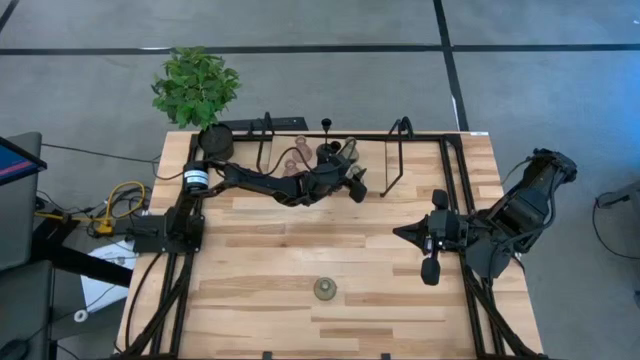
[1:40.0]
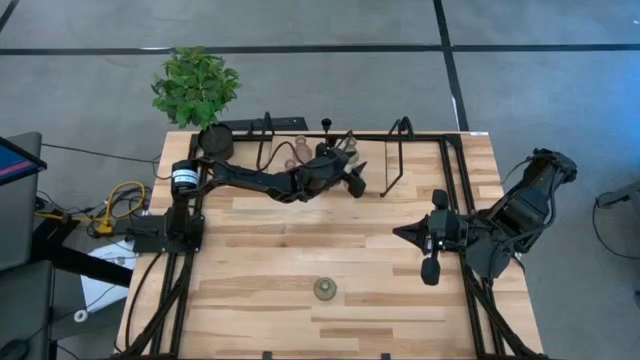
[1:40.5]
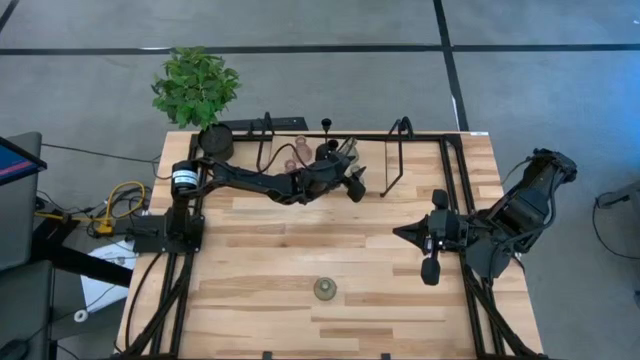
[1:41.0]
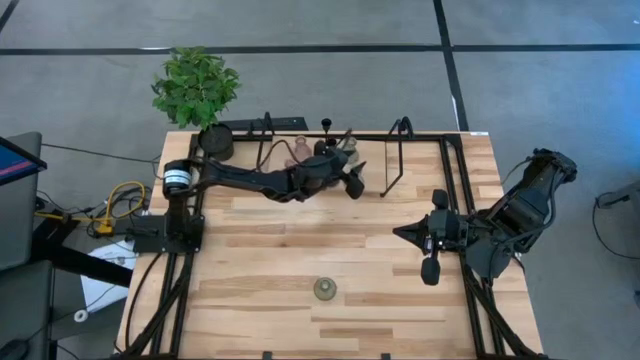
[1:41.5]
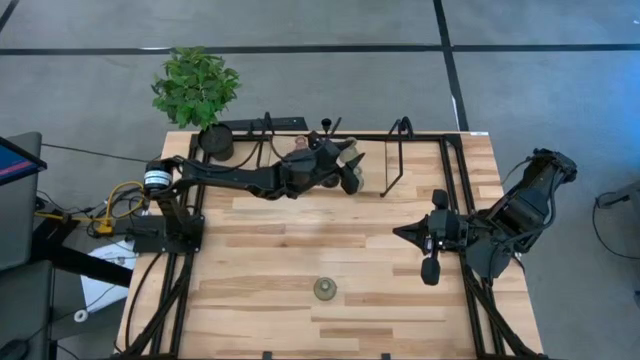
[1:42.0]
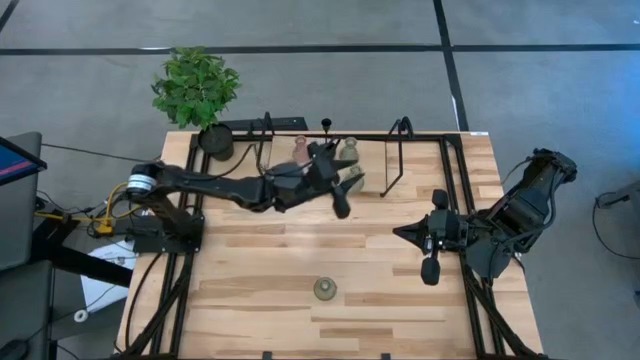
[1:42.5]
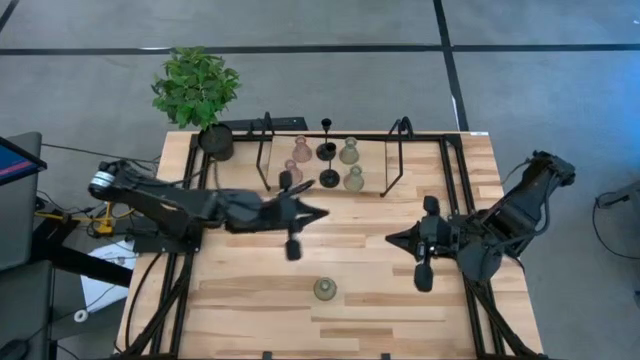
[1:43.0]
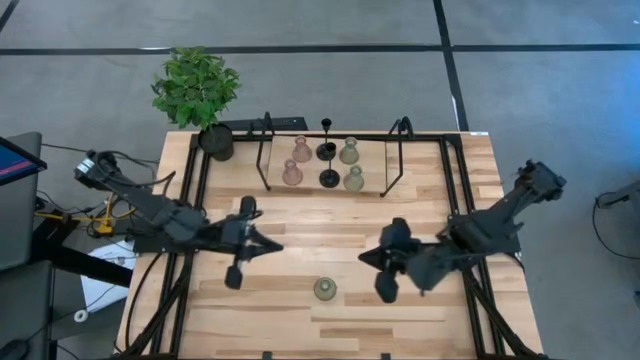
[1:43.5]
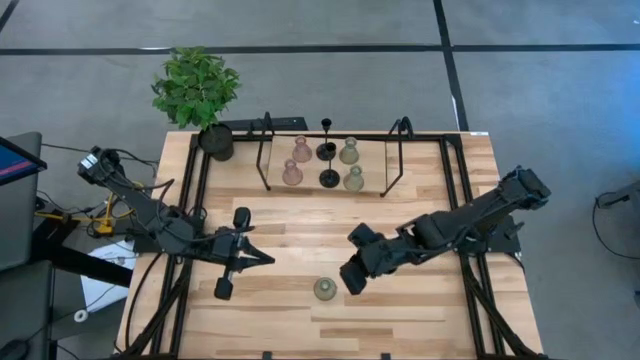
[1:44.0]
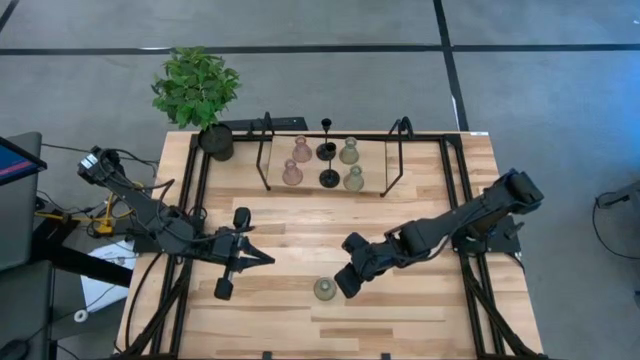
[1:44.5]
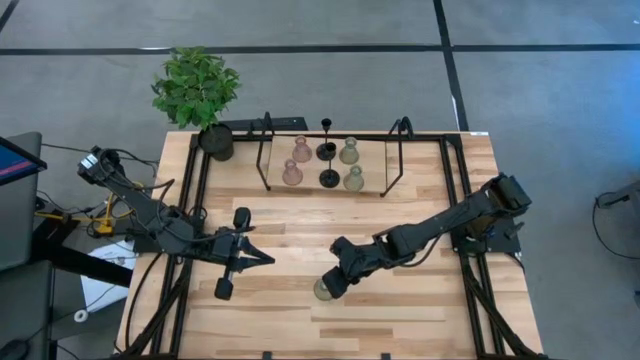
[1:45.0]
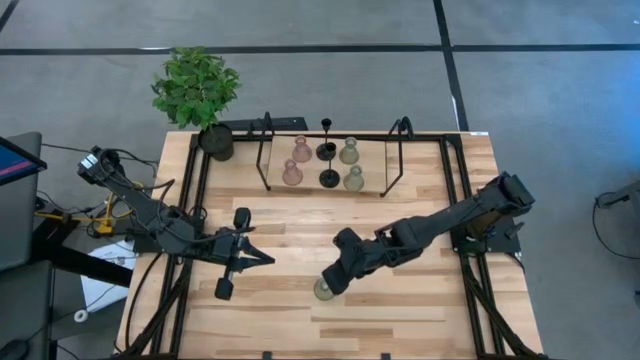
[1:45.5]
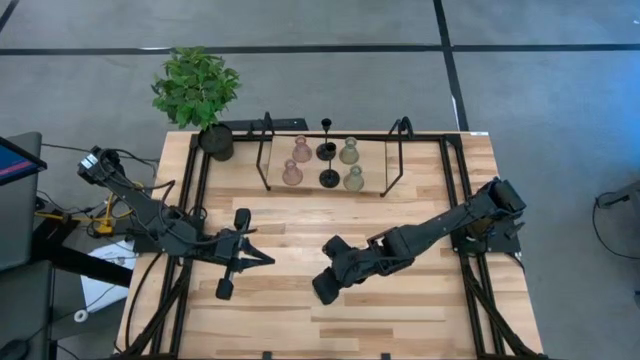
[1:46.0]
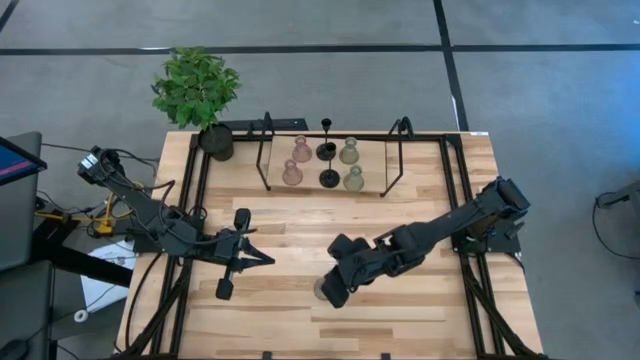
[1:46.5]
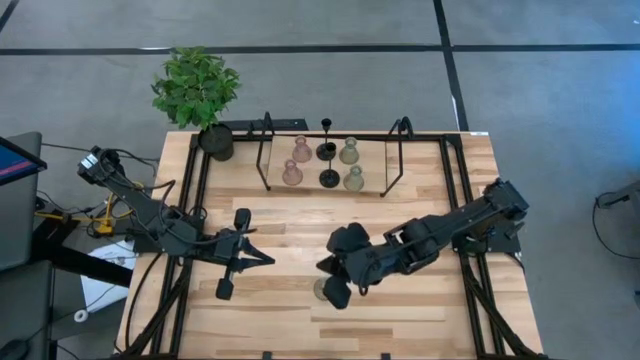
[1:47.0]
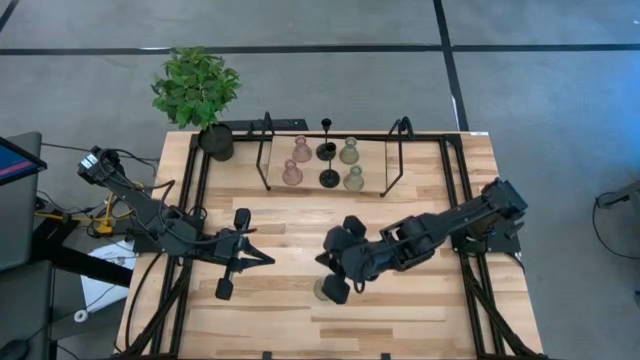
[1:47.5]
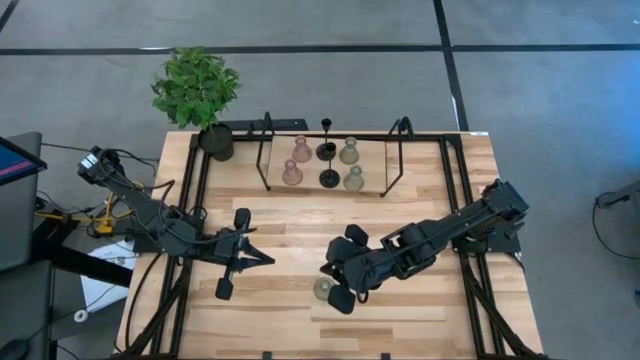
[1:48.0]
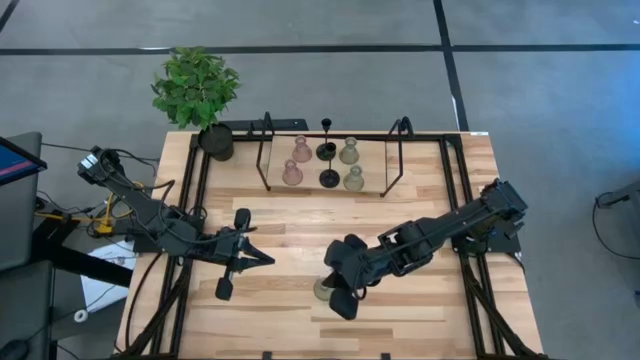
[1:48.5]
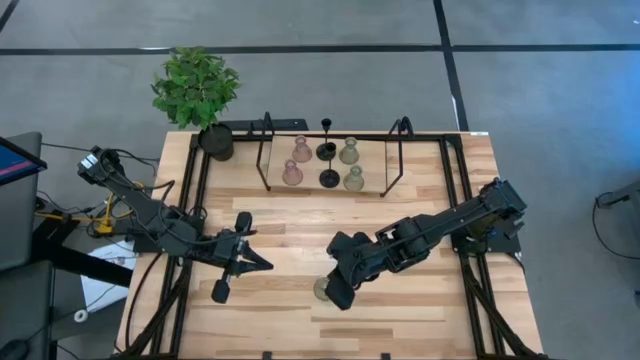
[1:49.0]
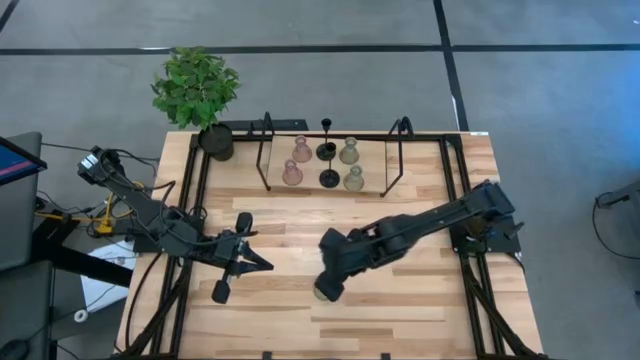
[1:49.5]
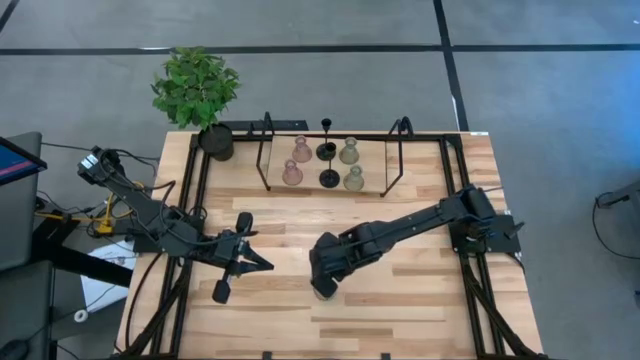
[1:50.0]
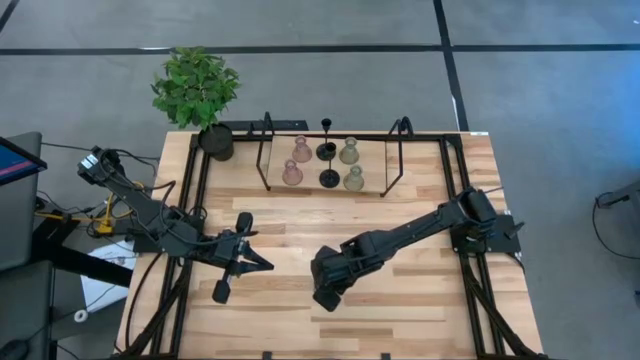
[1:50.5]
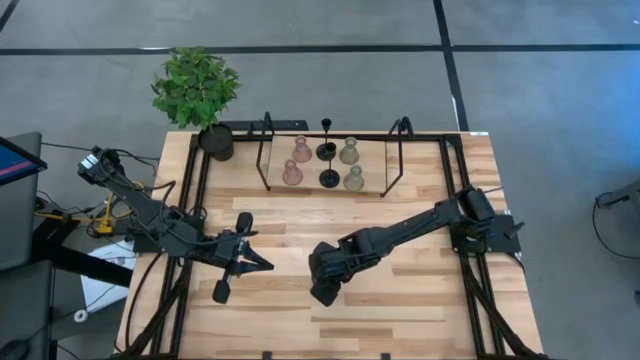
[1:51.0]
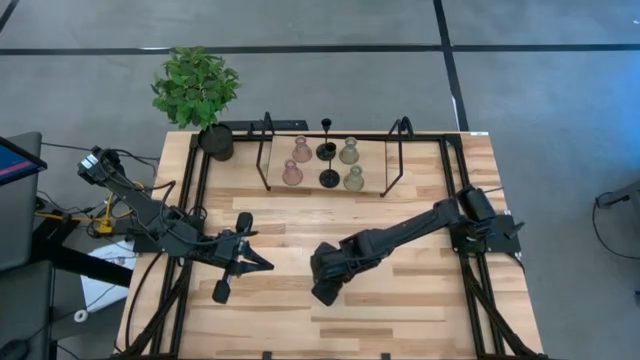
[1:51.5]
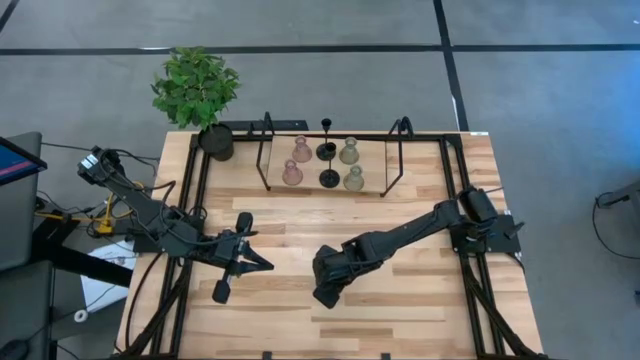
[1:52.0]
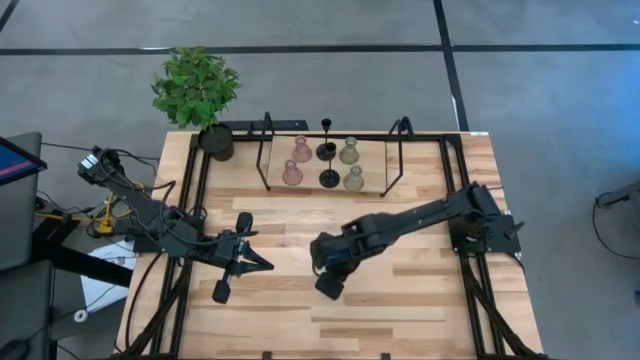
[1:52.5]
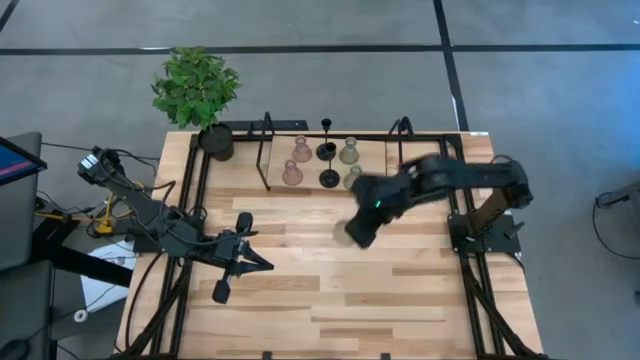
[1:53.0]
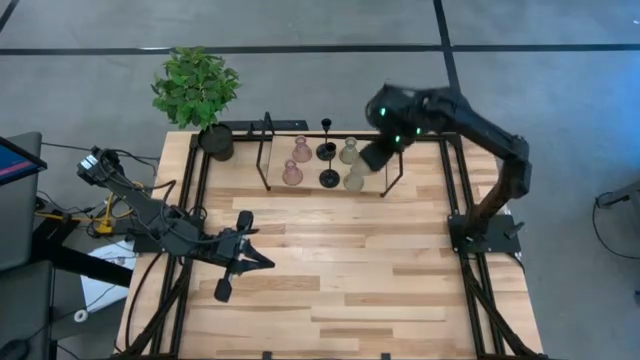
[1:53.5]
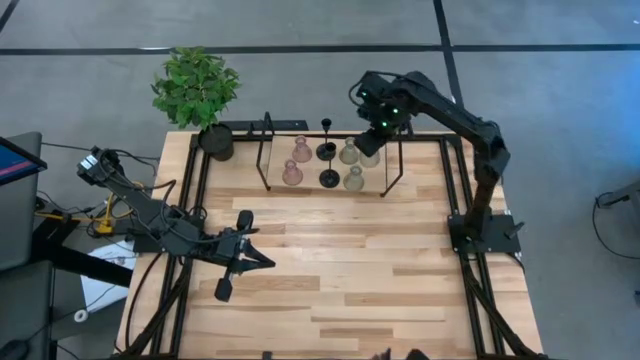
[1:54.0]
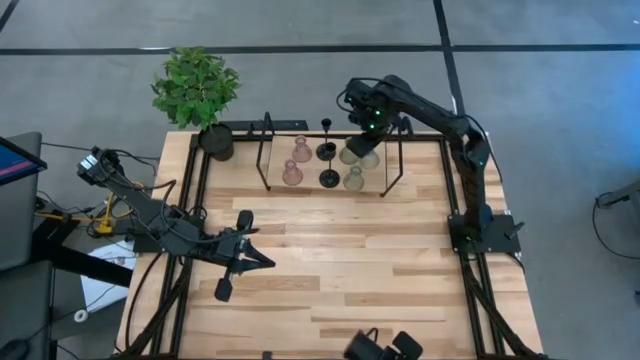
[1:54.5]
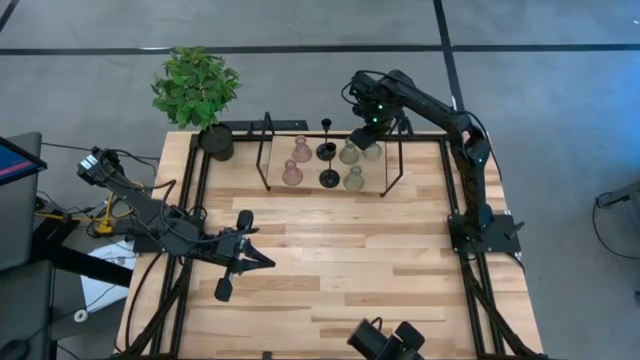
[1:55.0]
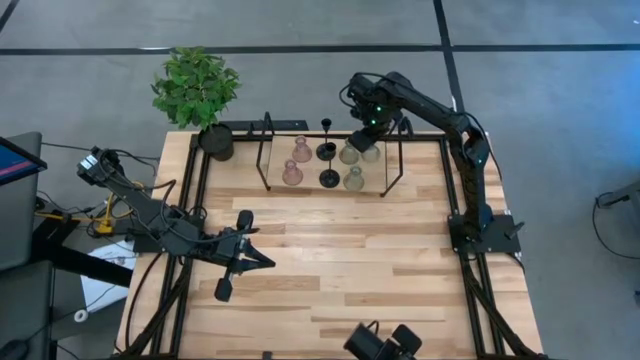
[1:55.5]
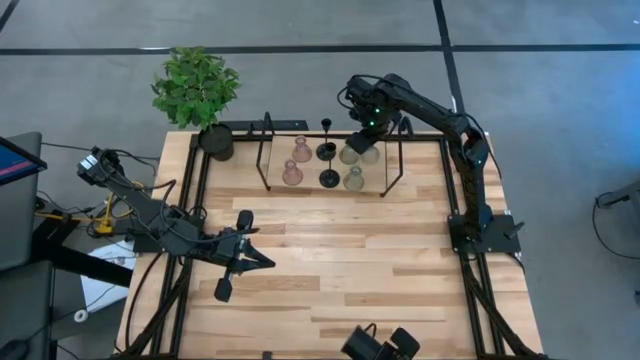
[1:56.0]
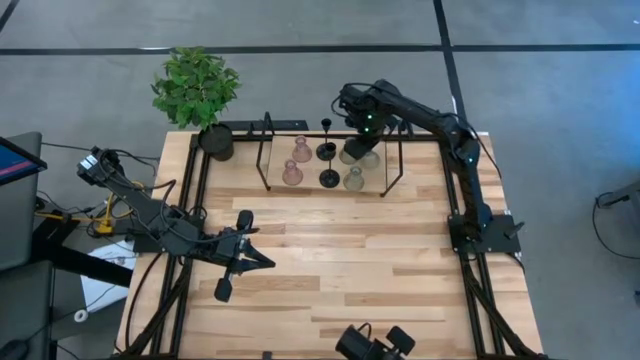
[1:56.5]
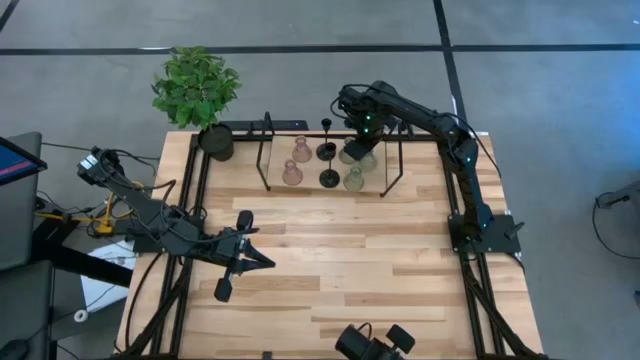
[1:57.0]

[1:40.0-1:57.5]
Task: Pick & Place candle stick holders
Put the green candle holder on the shelf

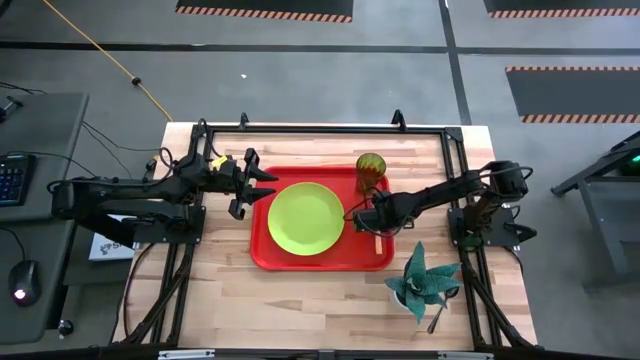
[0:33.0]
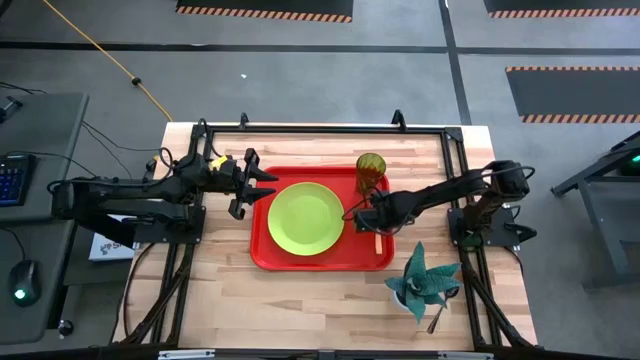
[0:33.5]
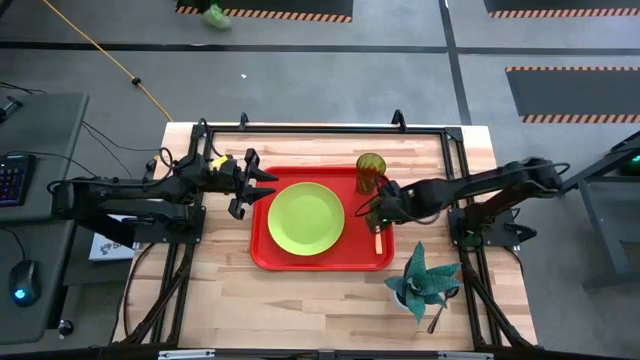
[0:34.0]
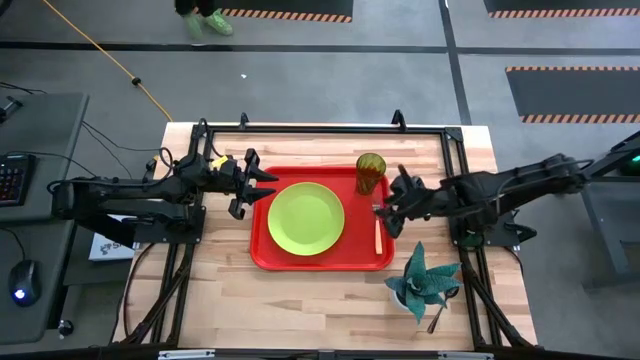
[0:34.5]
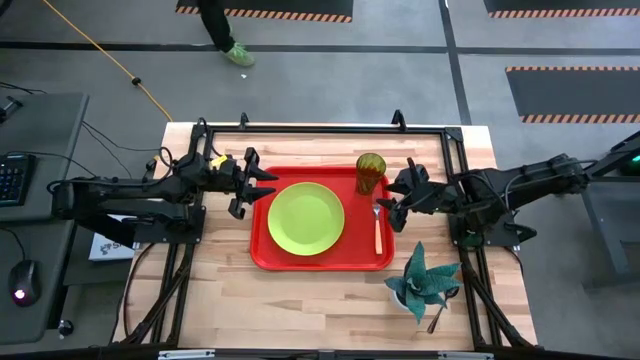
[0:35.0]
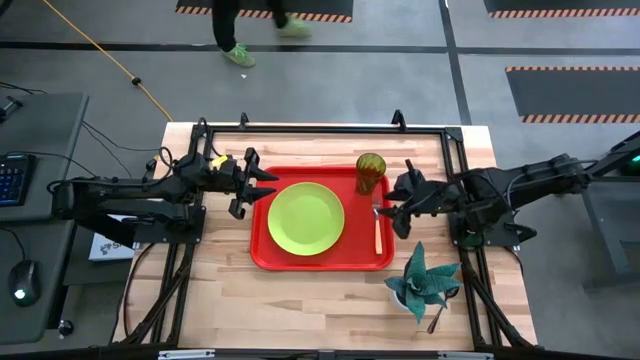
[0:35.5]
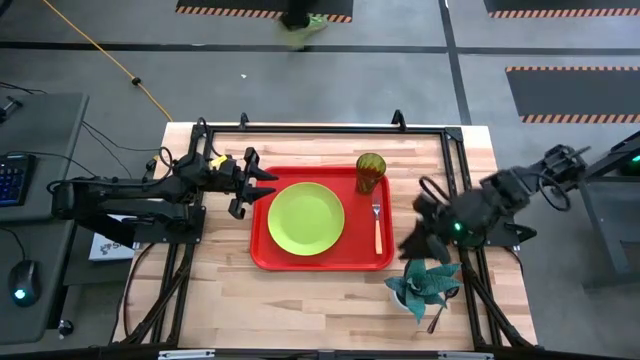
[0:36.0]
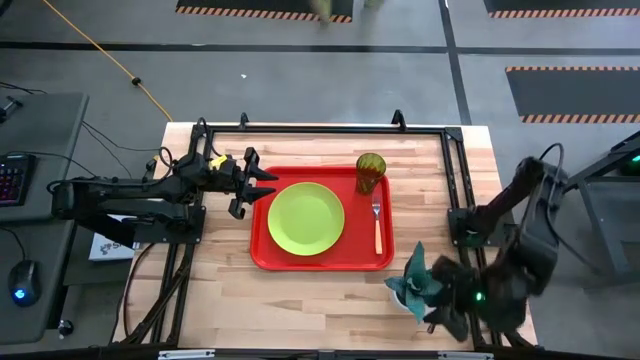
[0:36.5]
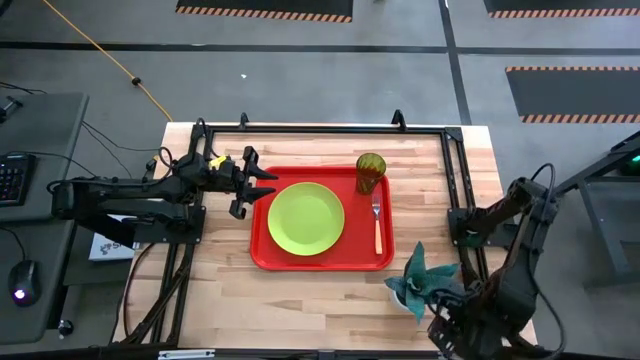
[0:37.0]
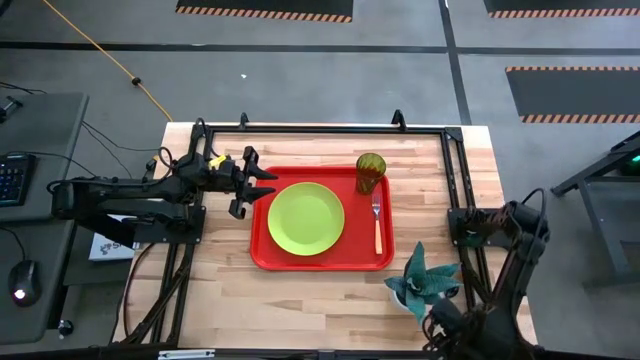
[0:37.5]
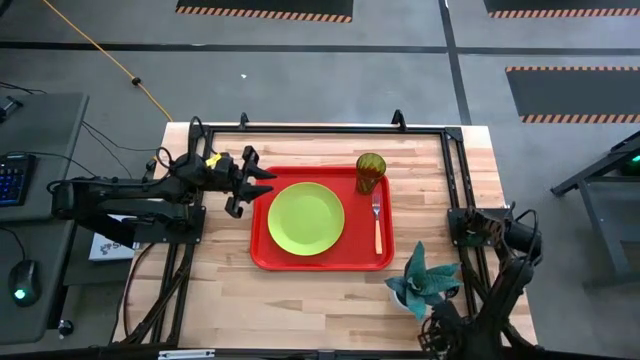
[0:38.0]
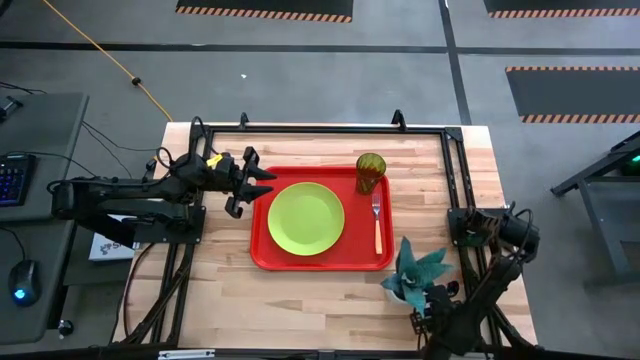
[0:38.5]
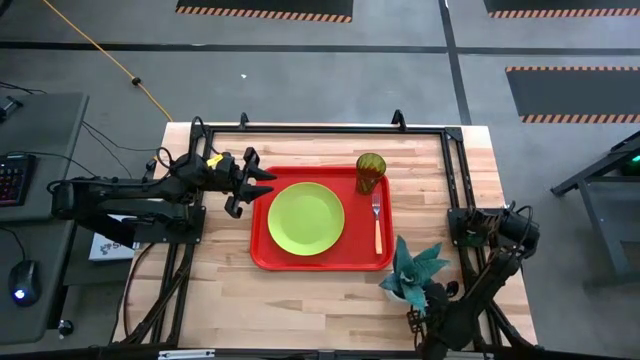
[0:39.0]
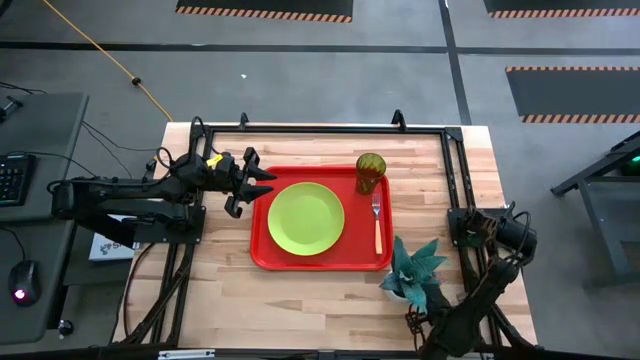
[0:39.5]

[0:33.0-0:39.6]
Task: Pick and place plate/cup/fork/spoon on tray
Put the black spoon on the red serving tray between the green plate and orange fork
